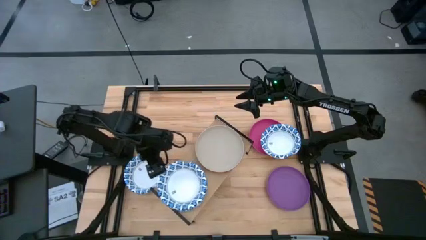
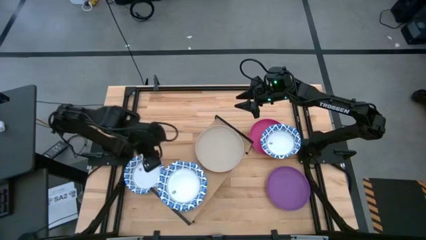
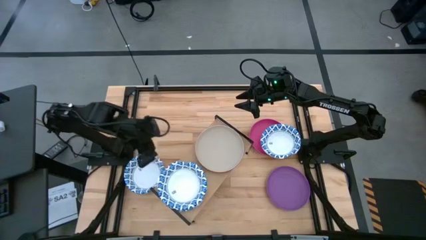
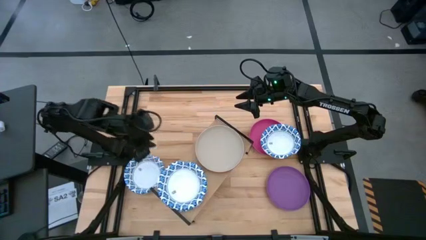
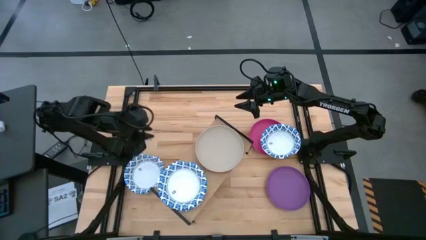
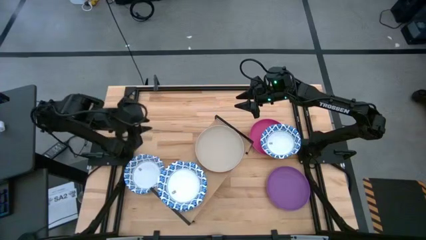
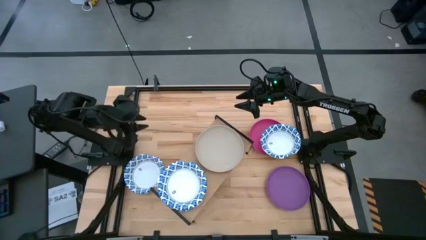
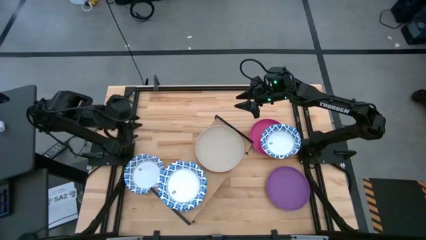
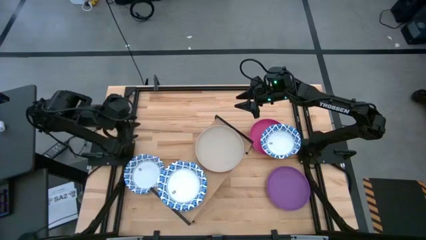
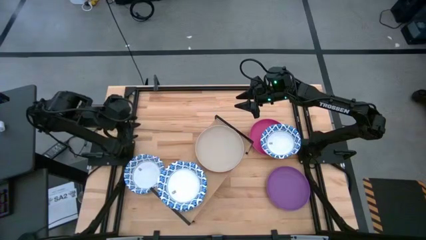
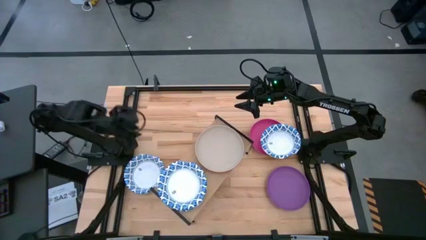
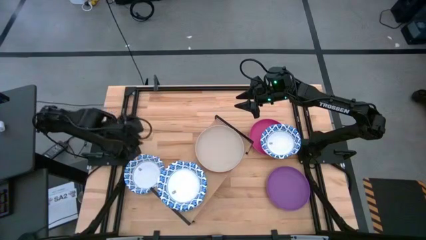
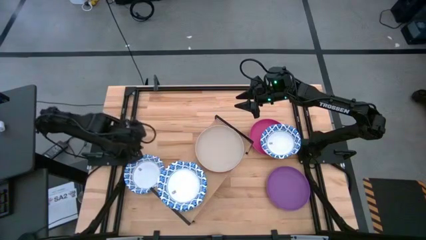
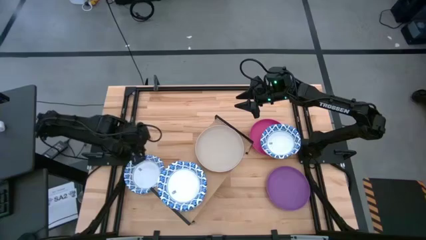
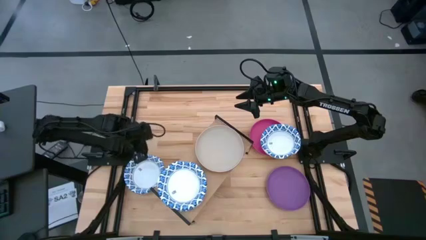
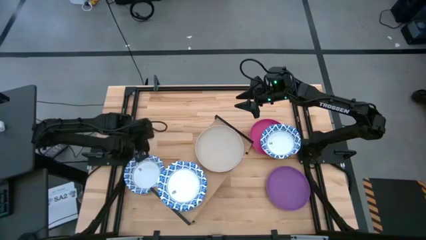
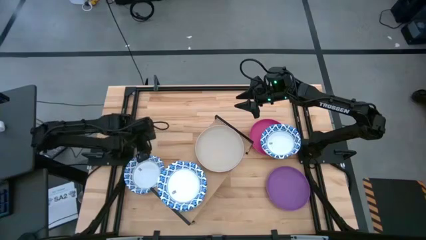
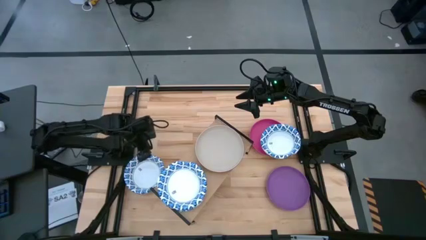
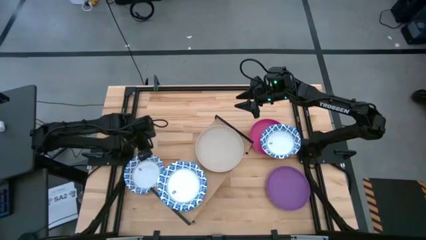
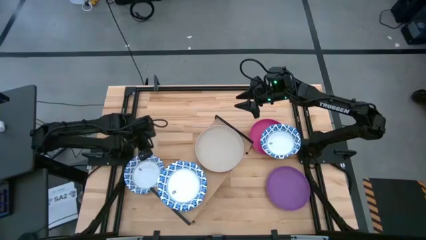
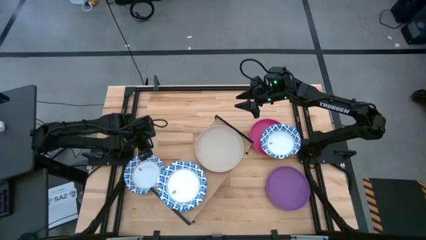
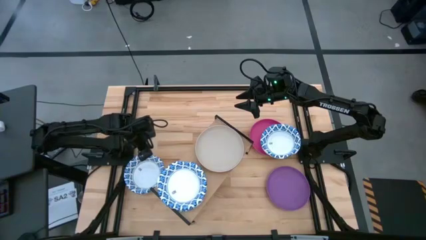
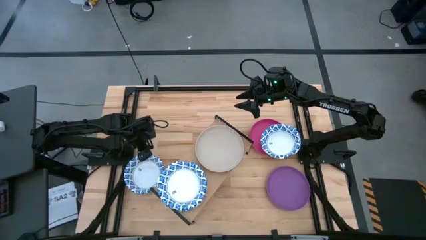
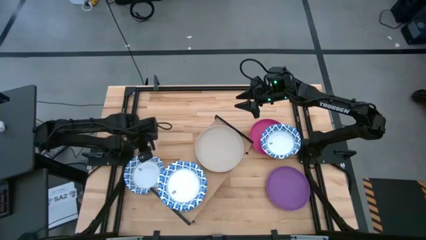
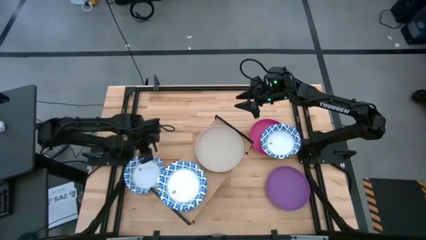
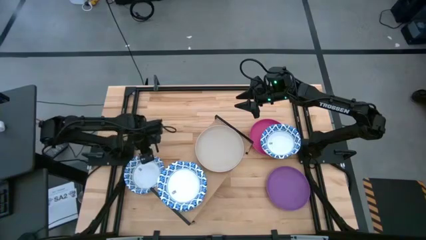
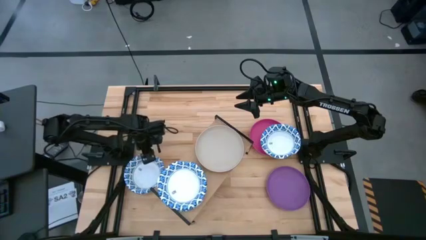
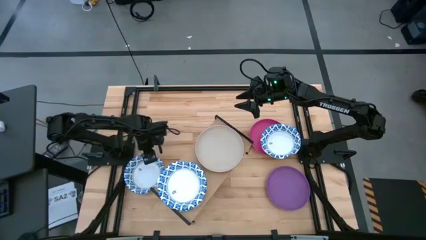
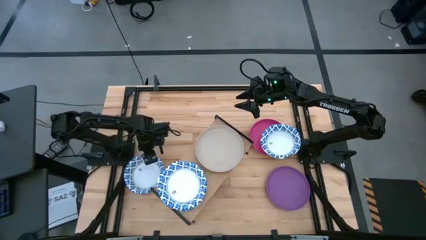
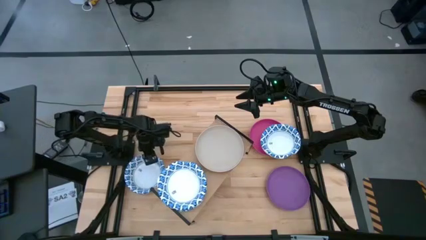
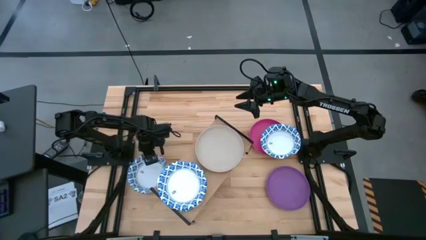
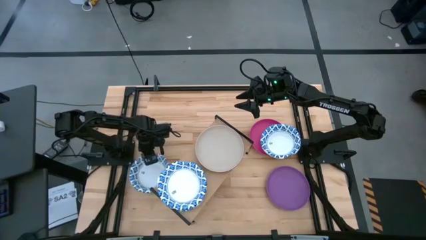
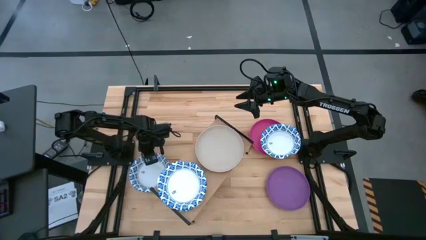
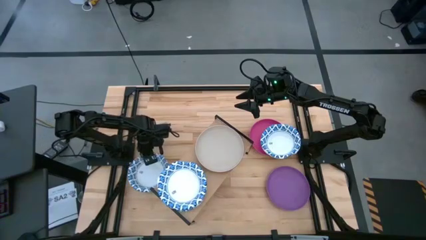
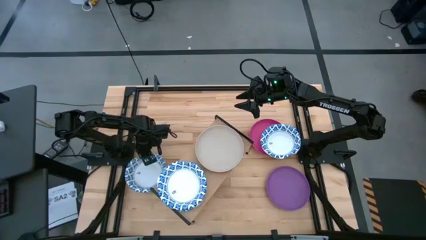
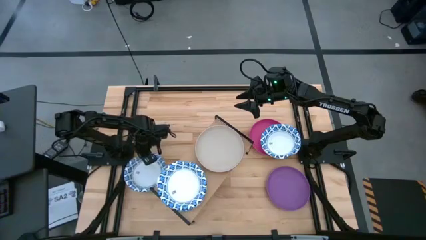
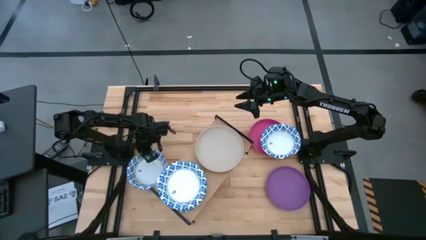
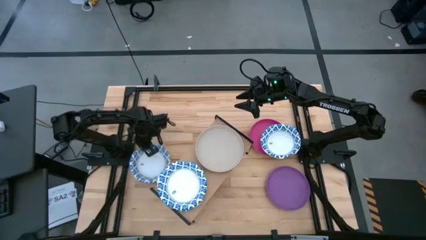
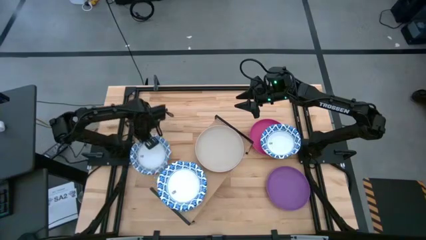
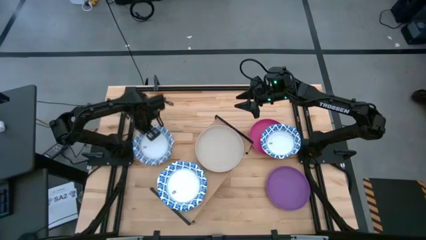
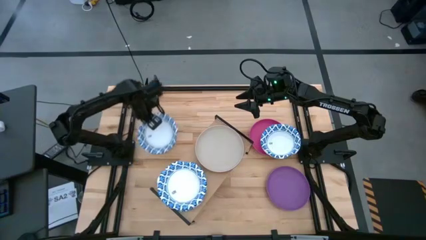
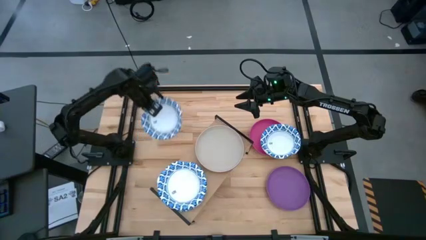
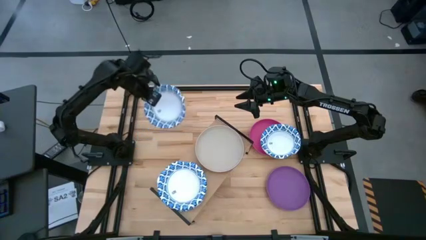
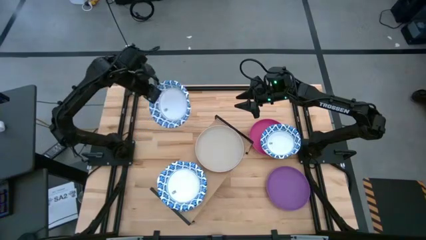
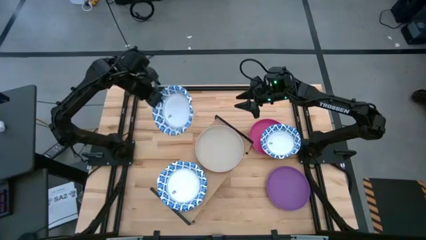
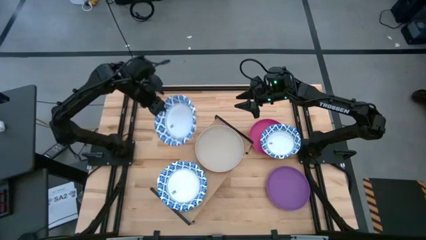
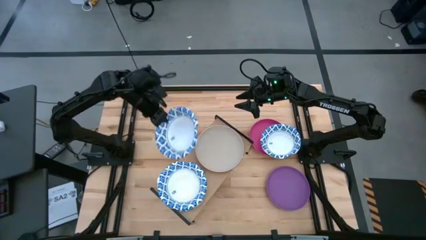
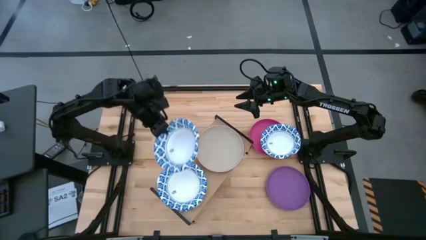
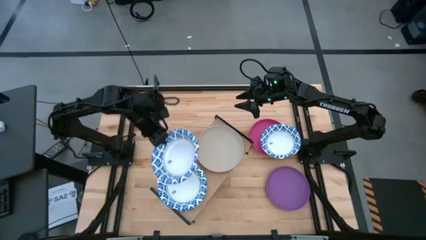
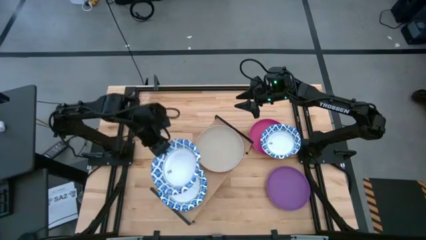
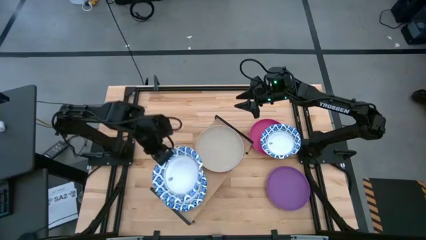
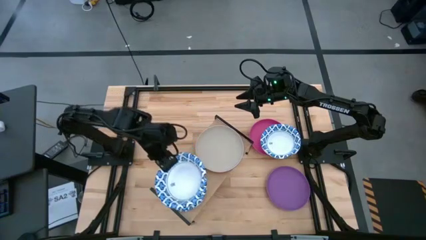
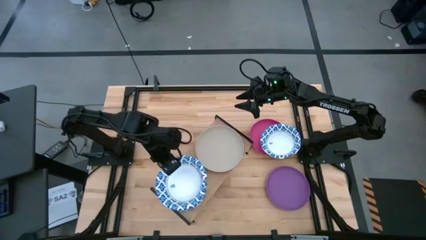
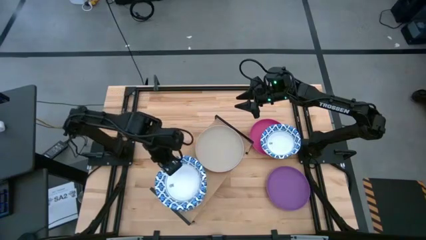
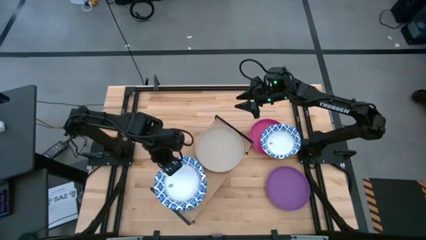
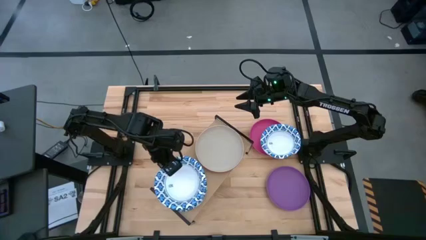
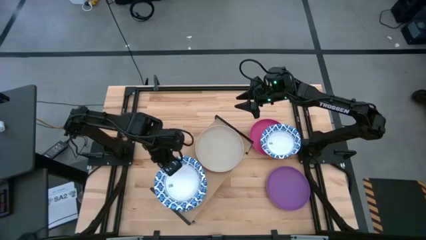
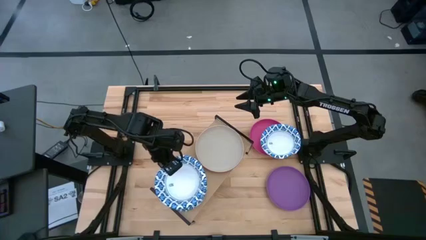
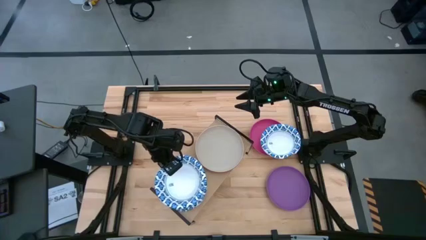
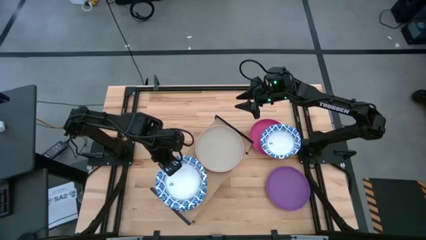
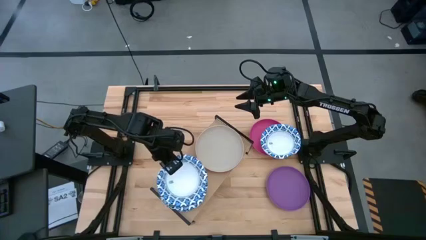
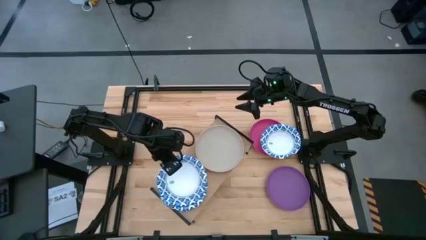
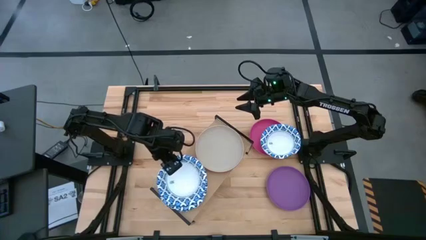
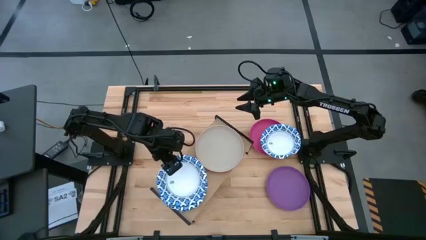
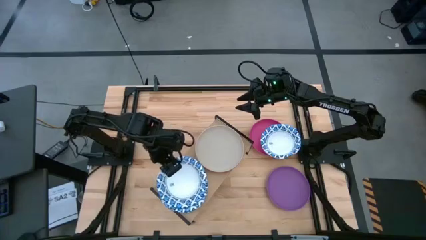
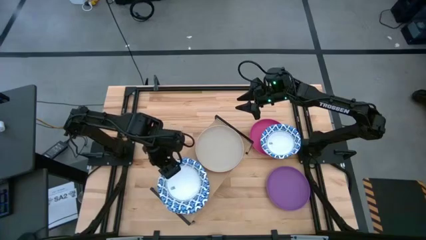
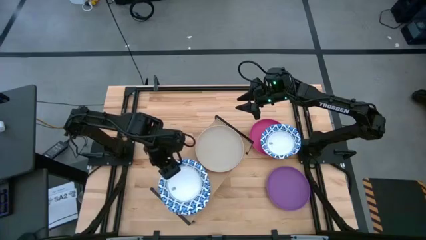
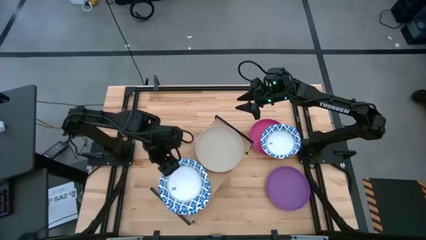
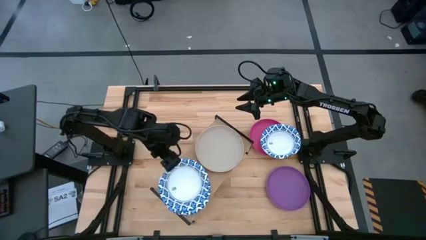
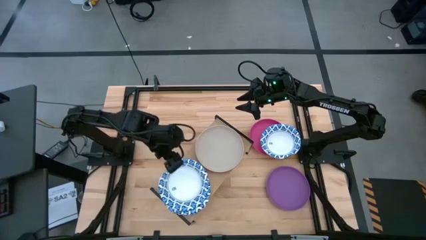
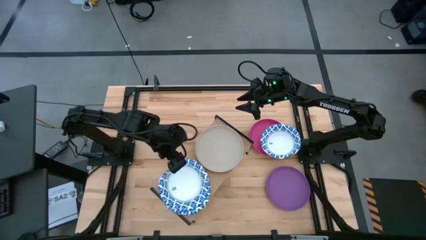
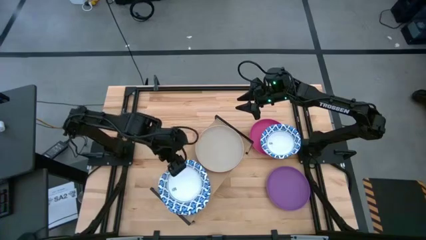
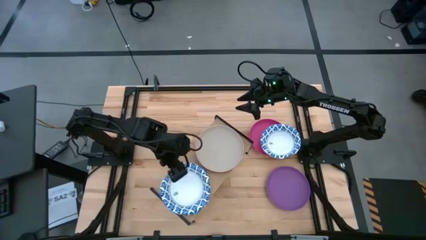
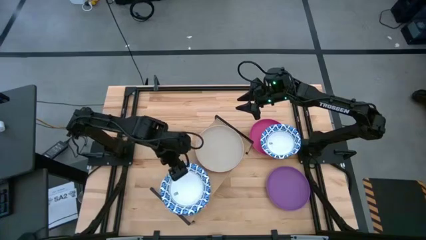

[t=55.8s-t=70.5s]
Task: Place and stack plates onto a shelf
Stack the white blue patterned plate on top of the white blue patterned plate on the shelf

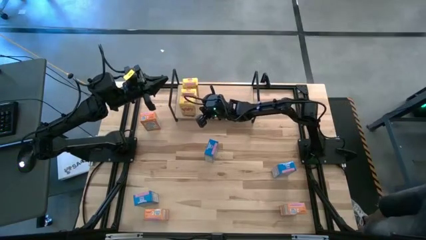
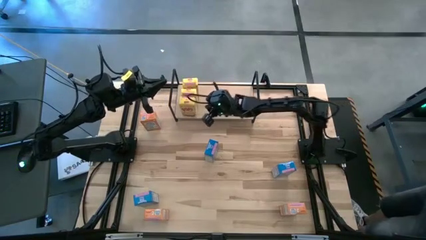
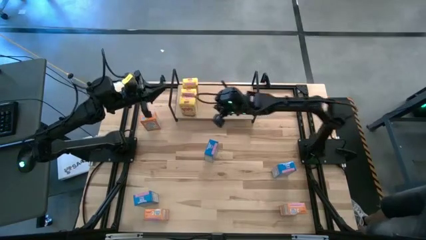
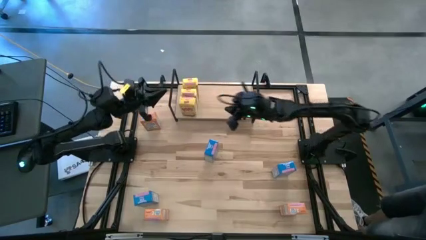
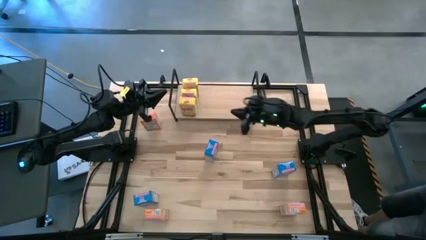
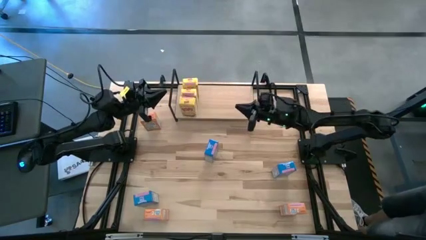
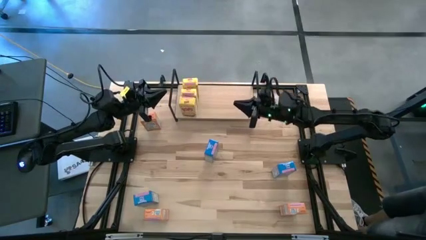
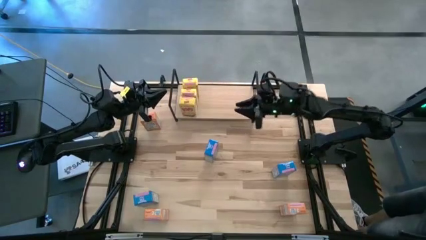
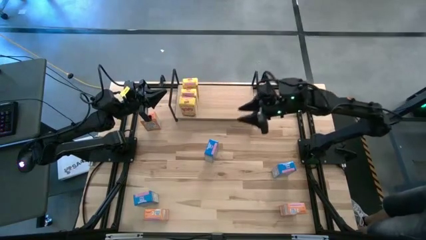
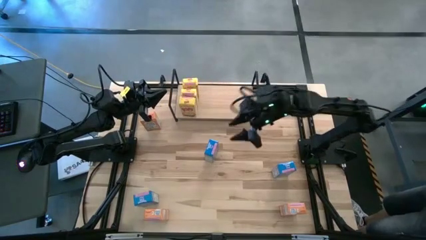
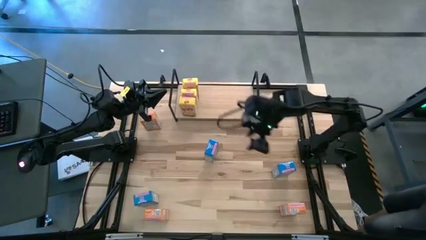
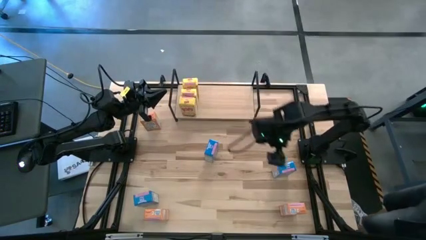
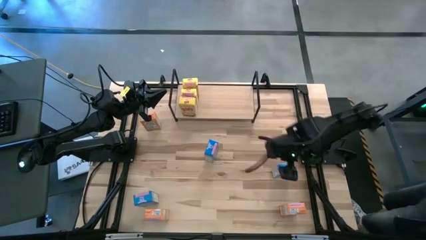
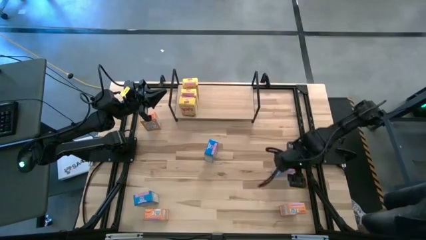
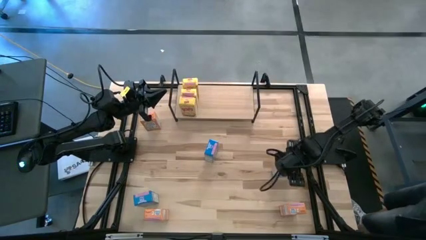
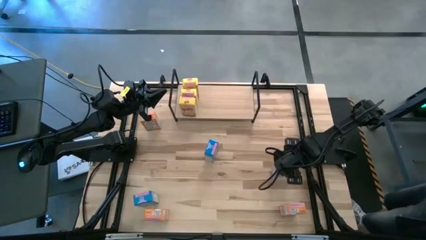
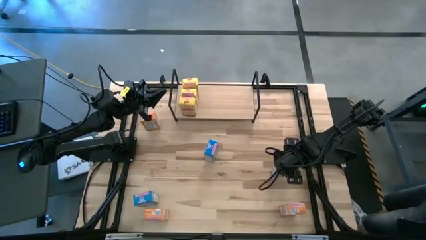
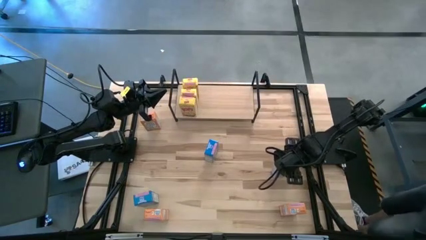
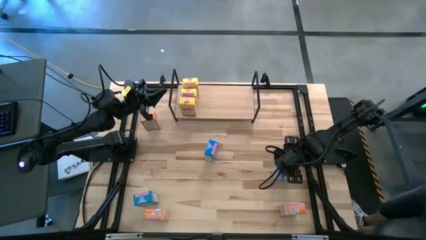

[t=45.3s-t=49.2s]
Task: Stack cereal on shelf
Put the middle right blue cereal box on the shelf
